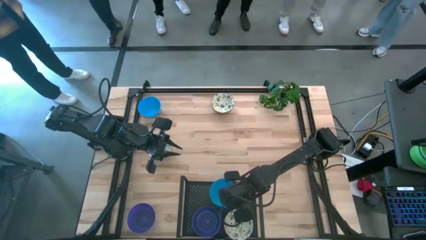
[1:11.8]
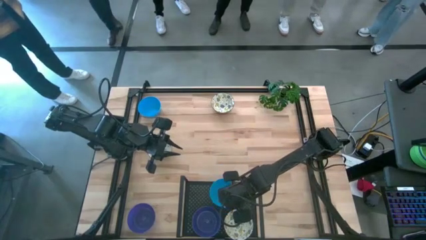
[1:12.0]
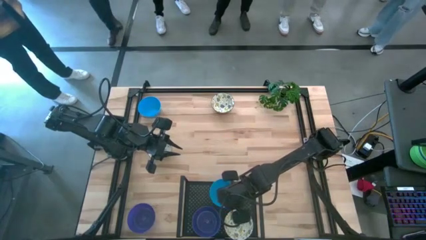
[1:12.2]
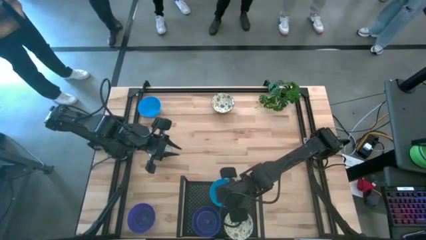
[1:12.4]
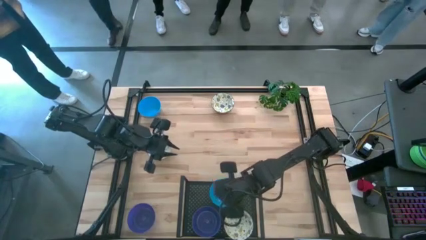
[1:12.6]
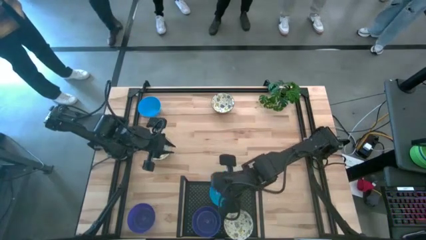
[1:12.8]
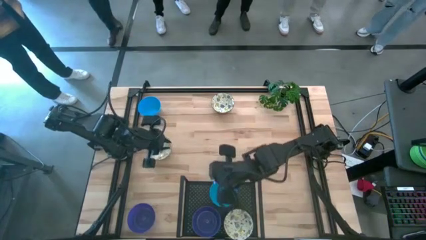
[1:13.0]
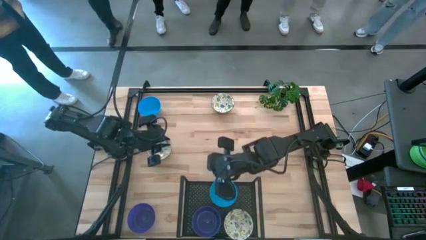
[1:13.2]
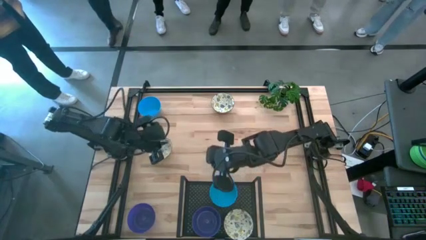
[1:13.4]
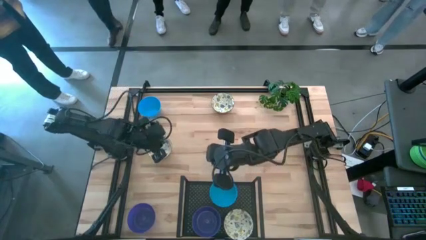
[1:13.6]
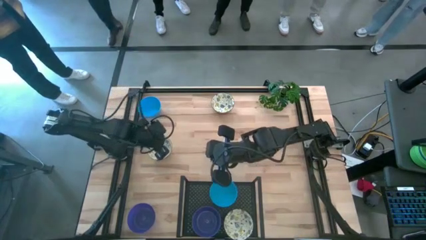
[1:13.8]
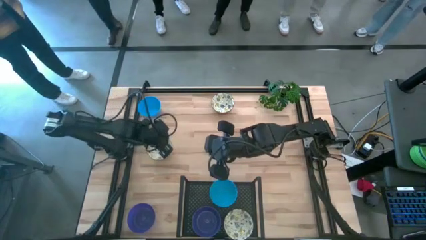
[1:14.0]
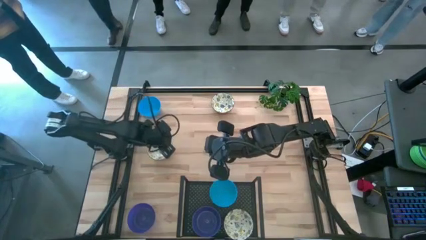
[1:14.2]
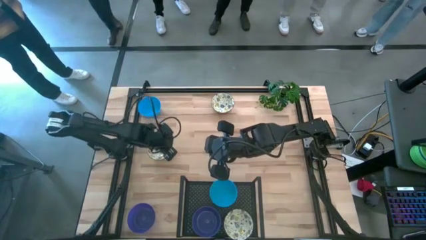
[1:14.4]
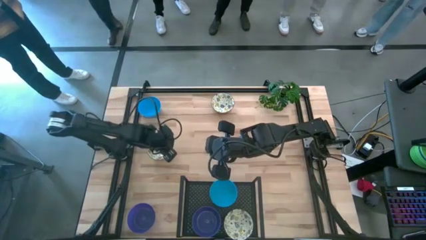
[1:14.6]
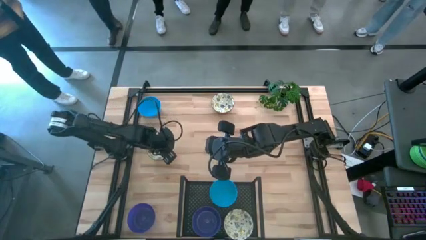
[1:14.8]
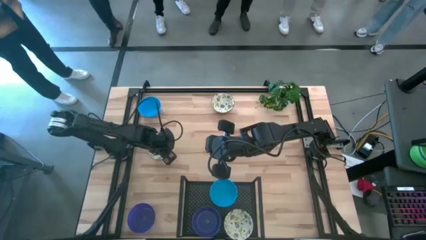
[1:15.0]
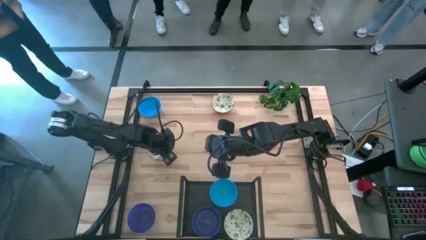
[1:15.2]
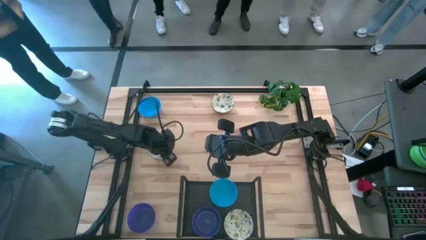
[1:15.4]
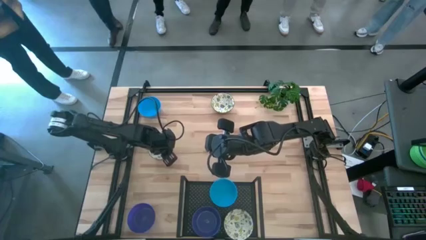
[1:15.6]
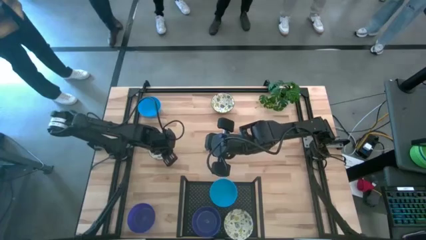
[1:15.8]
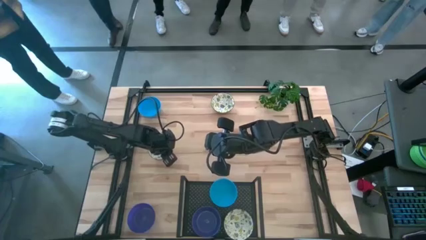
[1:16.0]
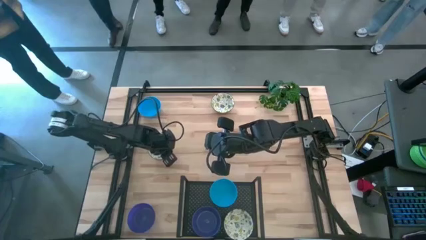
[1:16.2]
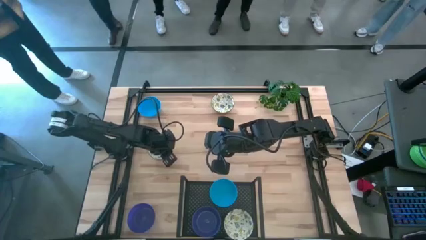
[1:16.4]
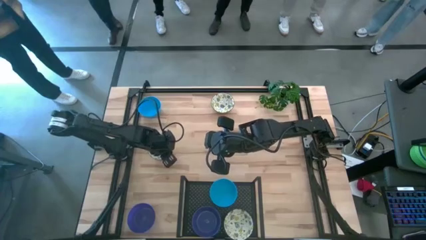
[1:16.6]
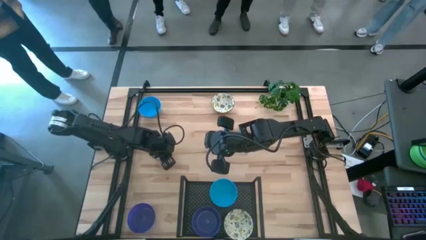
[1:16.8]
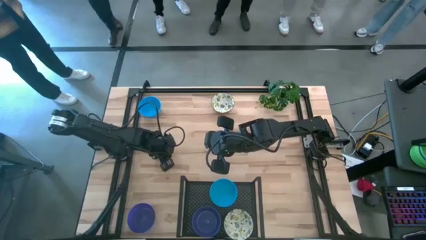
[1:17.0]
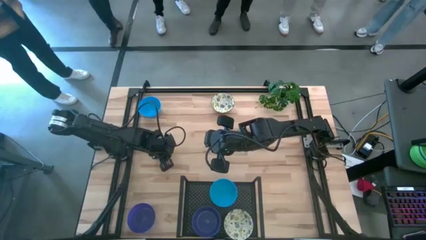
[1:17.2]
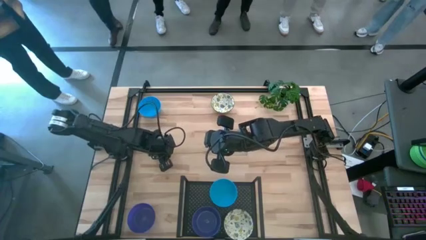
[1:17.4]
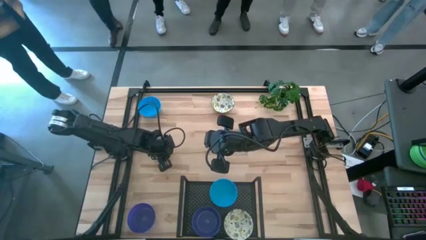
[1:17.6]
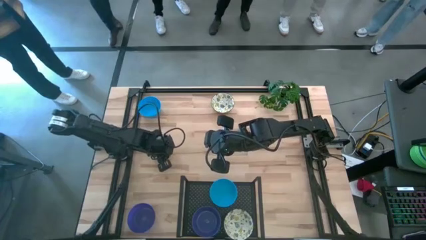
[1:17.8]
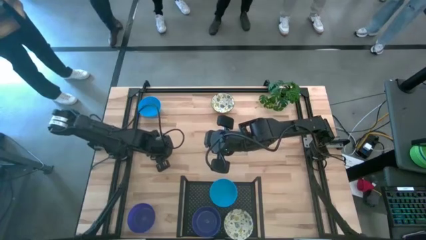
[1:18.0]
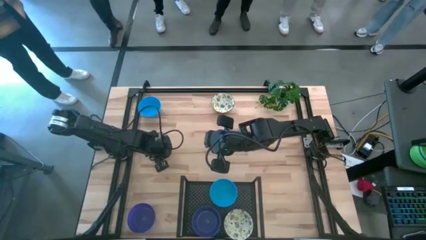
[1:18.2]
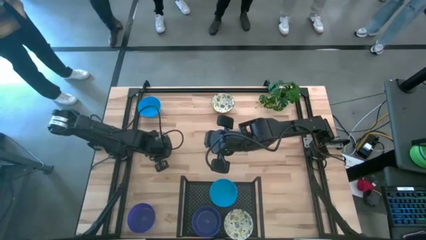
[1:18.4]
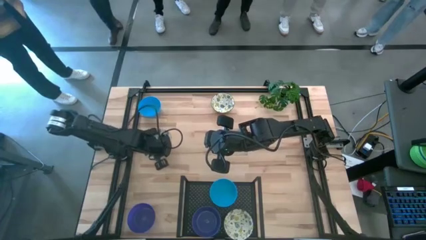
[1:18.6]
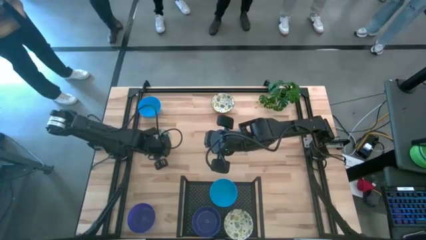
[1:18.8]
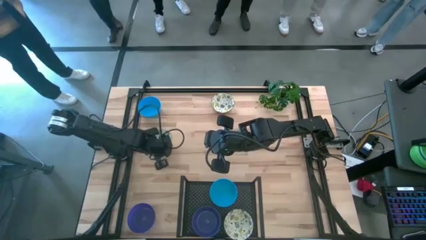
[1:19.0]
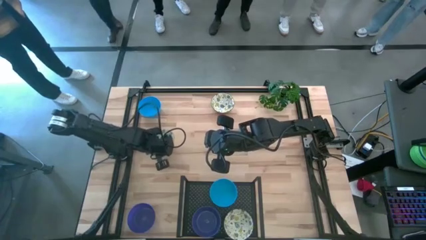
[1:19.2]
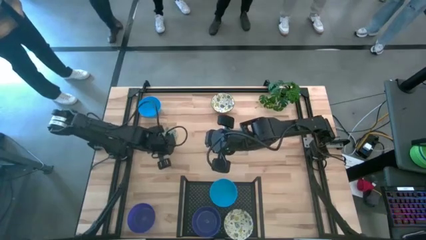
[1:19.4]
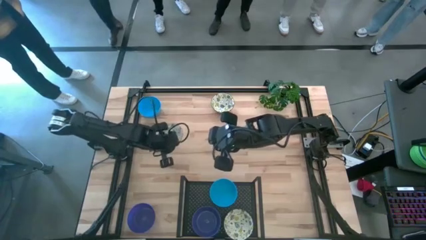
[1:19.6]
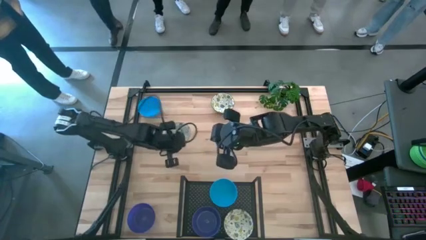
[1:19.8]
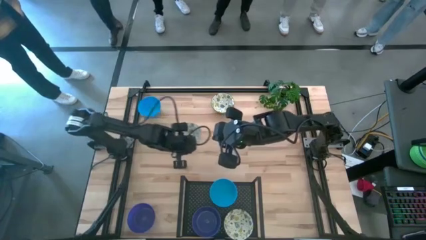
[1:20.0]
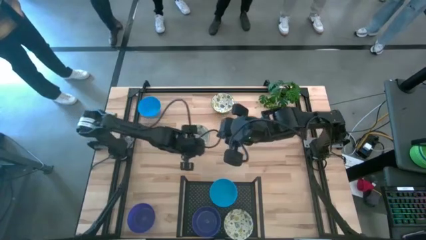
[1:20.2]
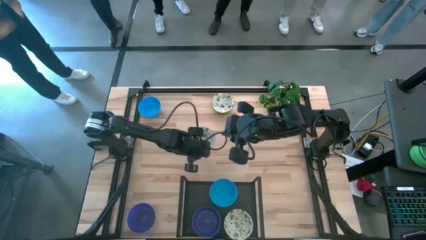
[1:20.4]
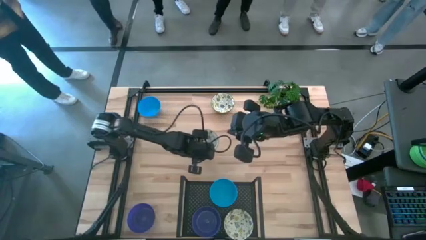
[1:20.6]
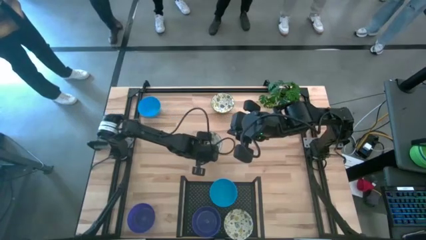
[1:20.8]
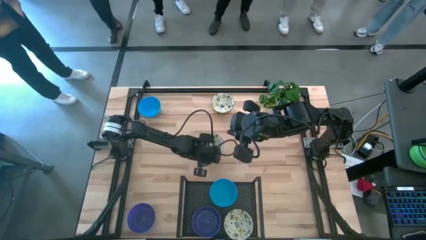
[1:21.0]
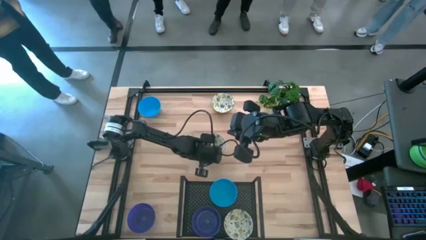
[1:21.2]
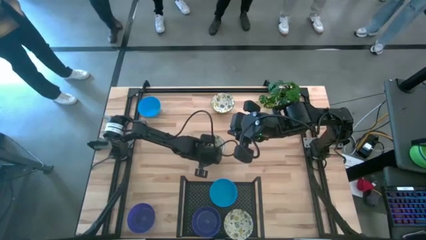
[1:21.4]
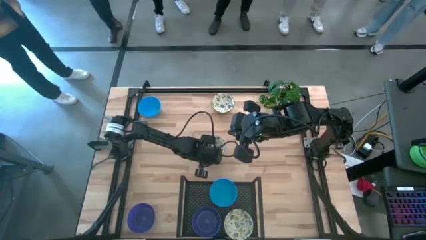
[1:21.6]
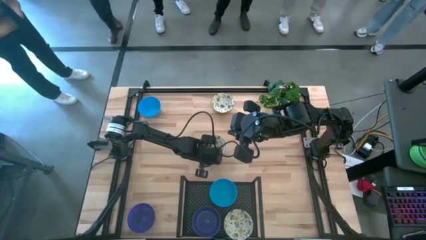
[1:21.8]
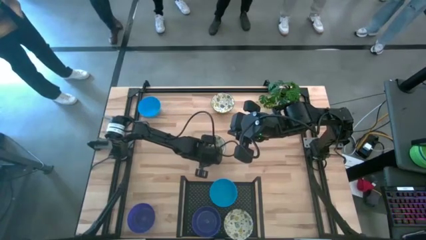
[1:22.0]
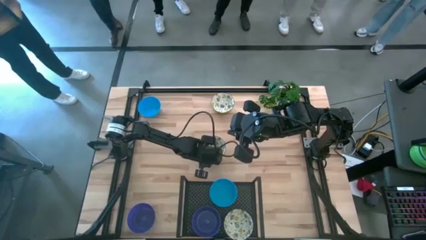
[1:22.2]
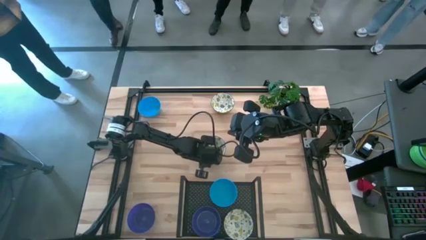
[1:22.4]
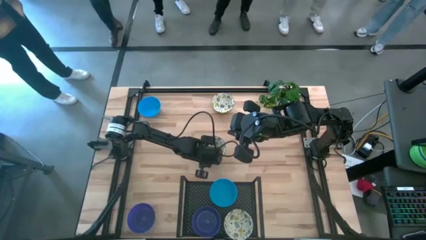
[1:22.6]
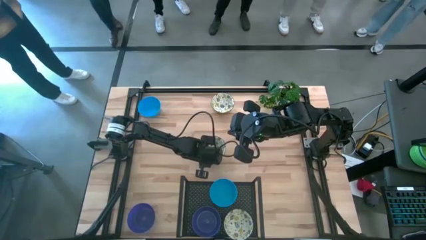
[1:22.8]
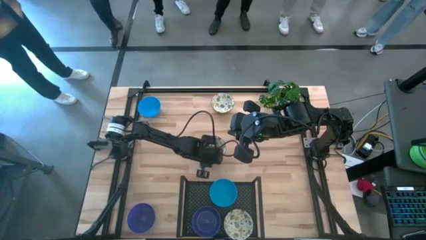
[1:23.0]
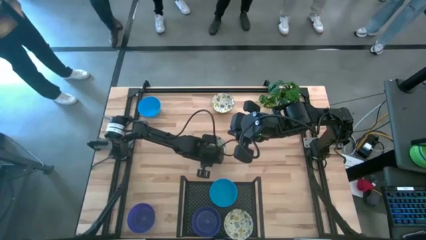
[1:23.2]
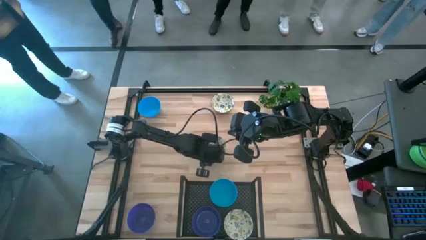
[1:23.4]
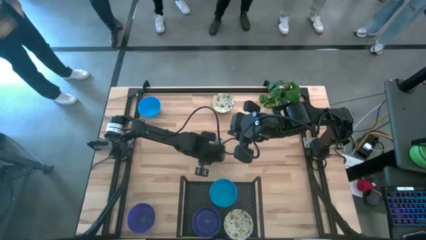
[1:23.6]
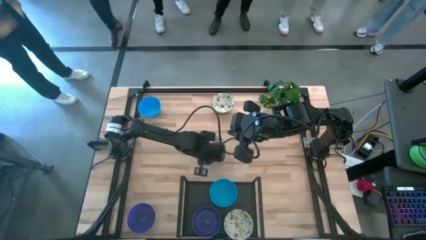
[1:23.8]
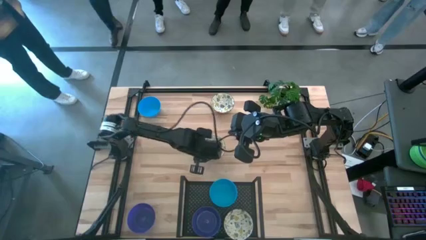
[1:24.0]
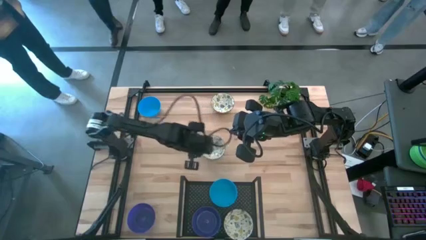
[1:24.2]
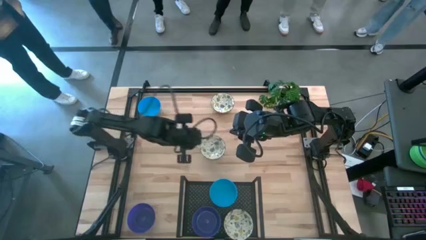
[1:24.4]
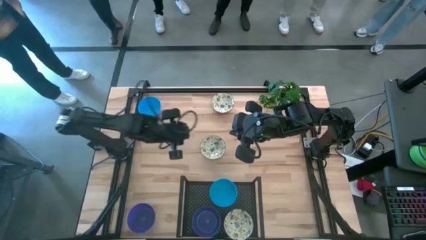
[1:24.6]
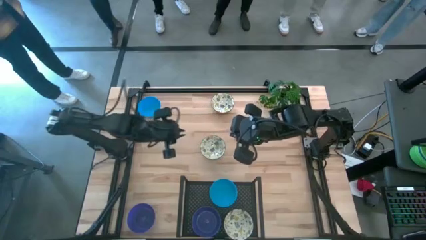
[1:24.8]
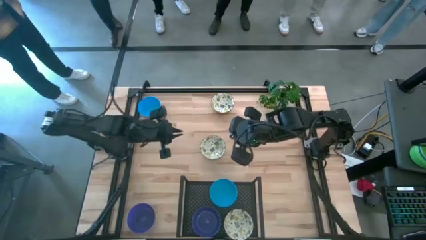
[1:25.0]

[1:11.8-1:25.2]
Task: Pick & Place Mini bowls
Stack the bottom white patterned bowl on top of the white patterned bowl on the shelf
